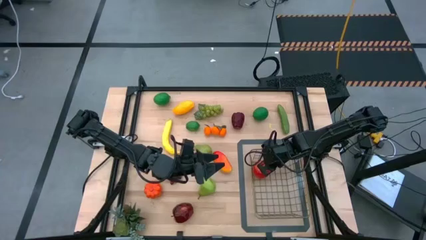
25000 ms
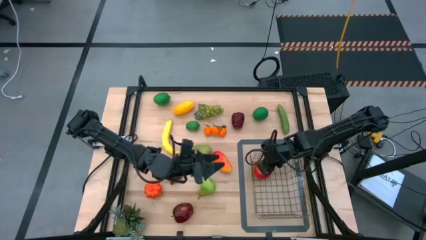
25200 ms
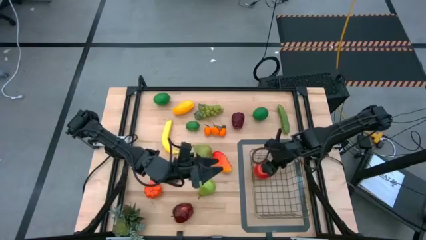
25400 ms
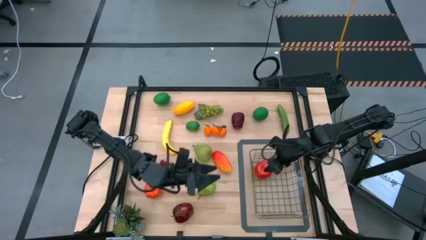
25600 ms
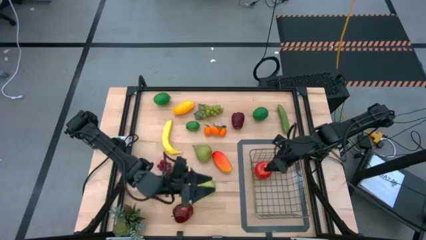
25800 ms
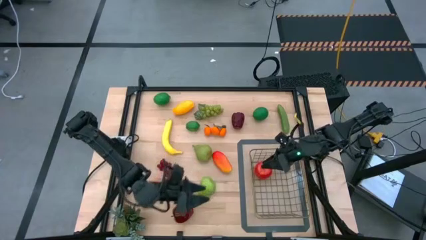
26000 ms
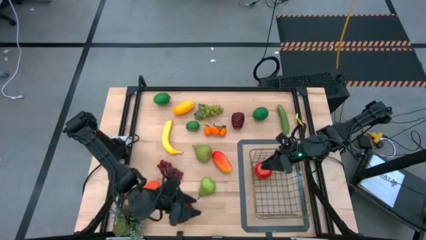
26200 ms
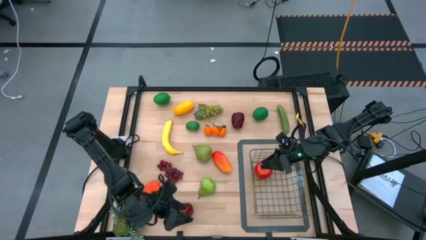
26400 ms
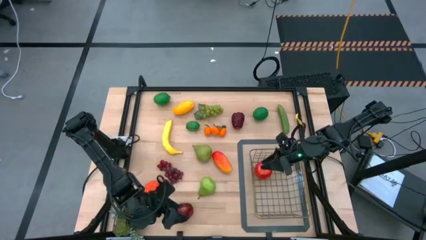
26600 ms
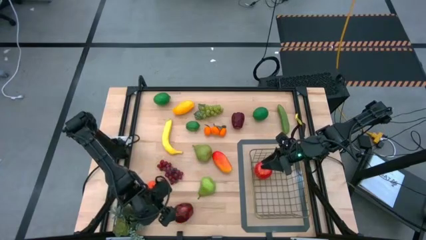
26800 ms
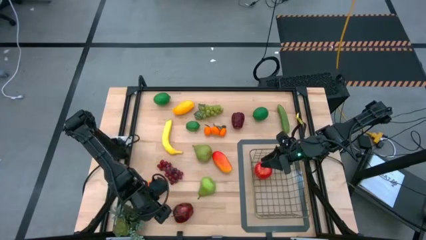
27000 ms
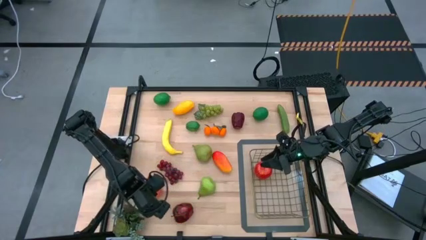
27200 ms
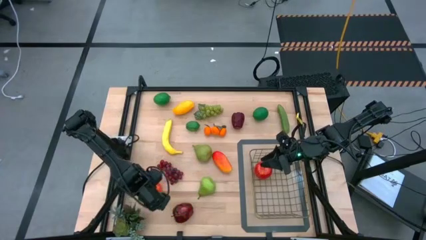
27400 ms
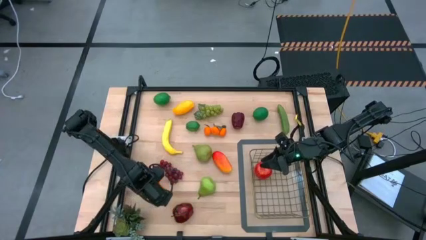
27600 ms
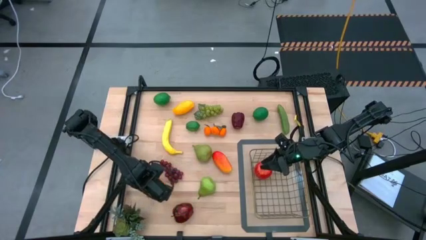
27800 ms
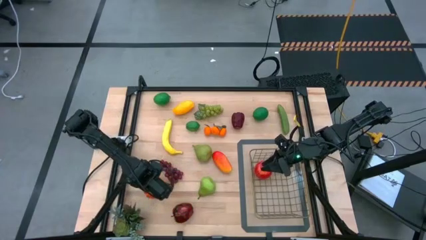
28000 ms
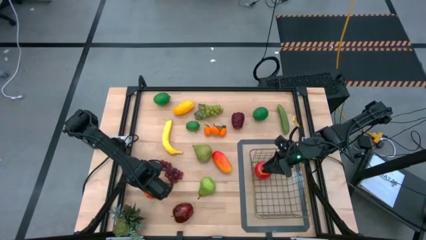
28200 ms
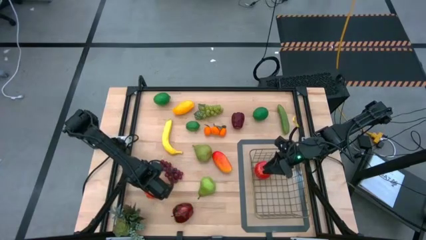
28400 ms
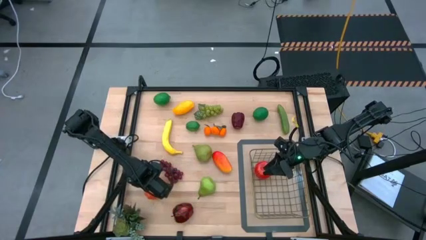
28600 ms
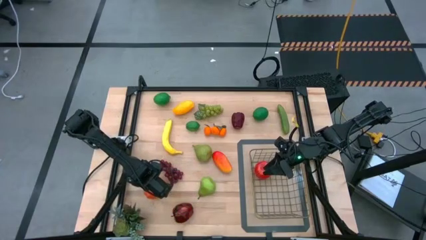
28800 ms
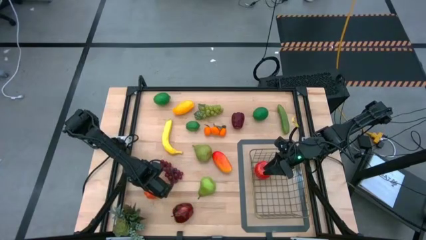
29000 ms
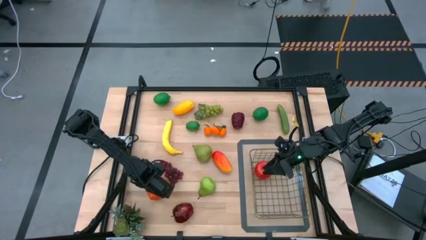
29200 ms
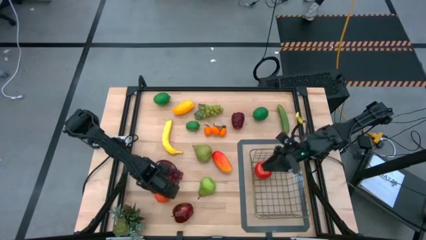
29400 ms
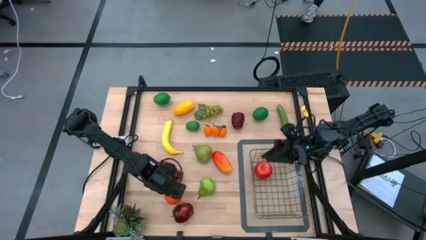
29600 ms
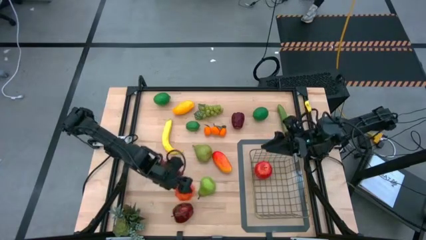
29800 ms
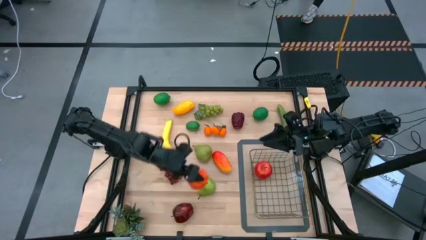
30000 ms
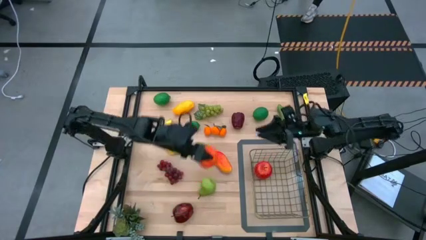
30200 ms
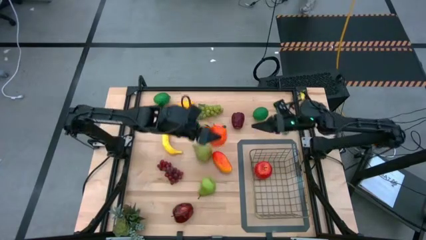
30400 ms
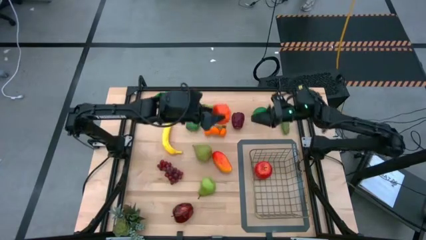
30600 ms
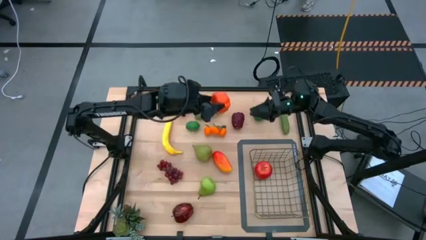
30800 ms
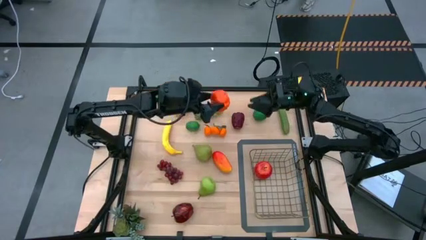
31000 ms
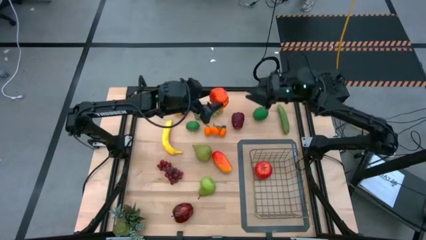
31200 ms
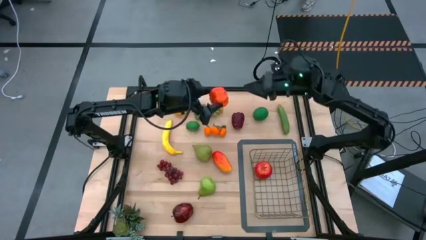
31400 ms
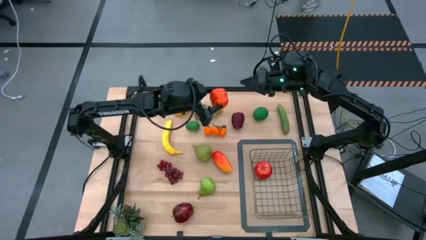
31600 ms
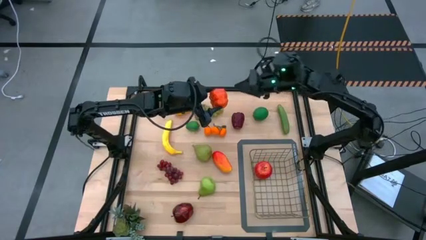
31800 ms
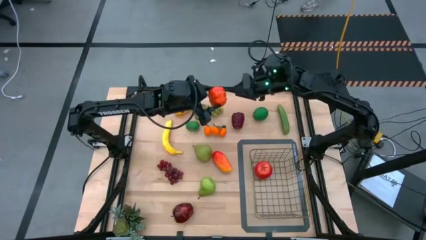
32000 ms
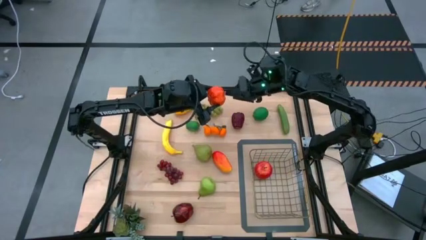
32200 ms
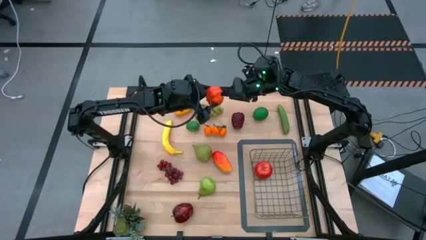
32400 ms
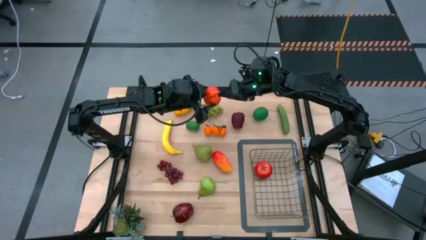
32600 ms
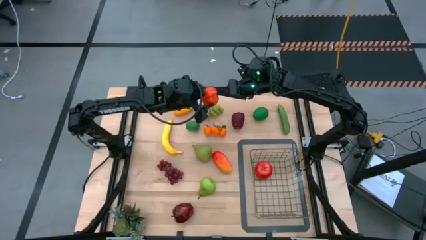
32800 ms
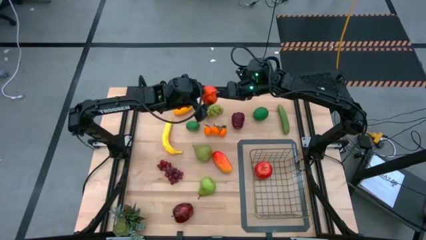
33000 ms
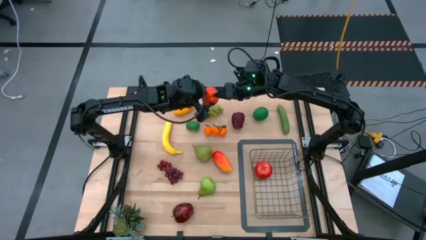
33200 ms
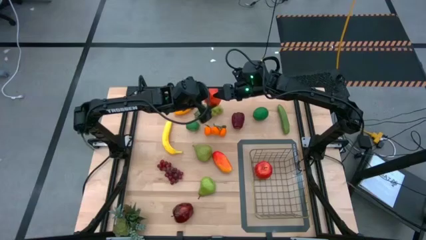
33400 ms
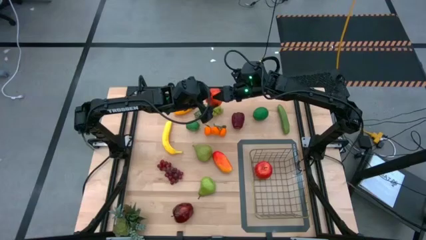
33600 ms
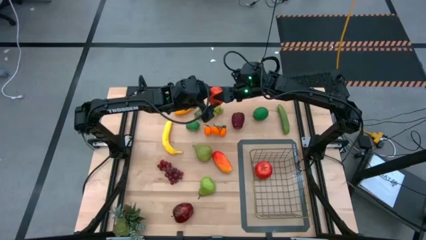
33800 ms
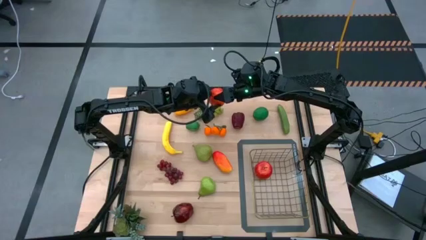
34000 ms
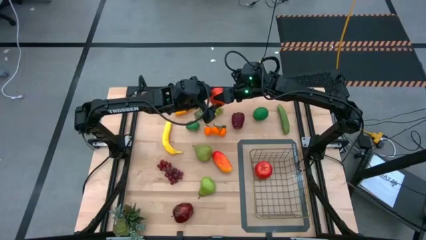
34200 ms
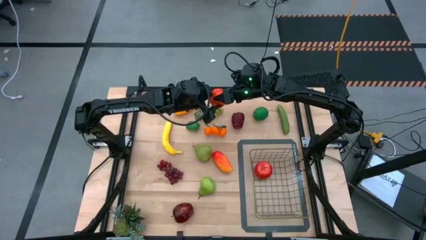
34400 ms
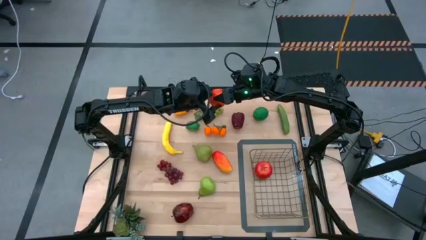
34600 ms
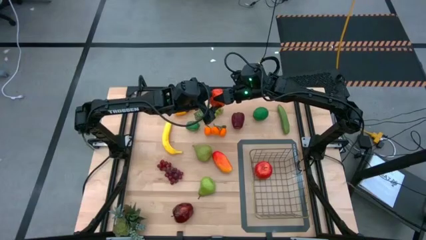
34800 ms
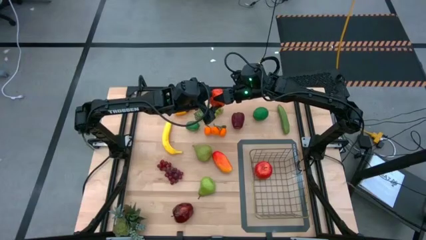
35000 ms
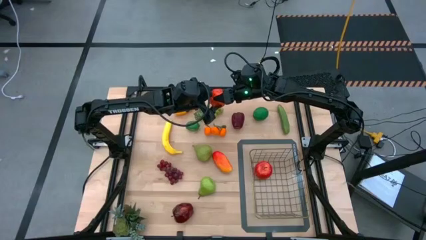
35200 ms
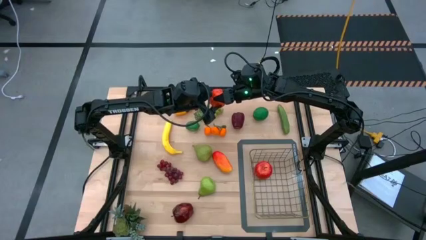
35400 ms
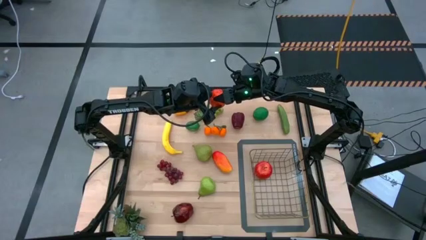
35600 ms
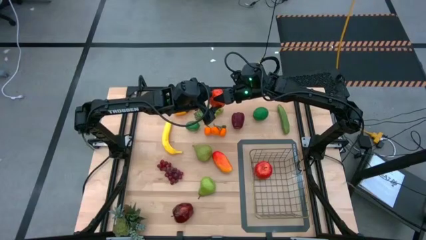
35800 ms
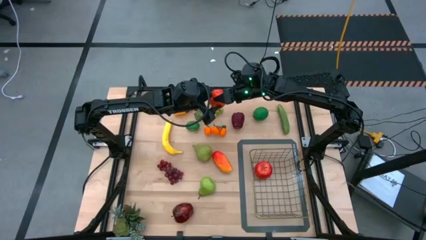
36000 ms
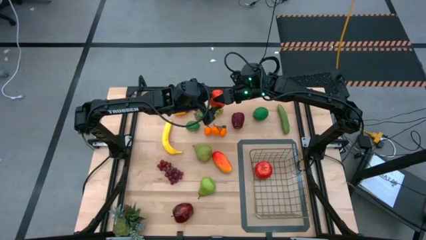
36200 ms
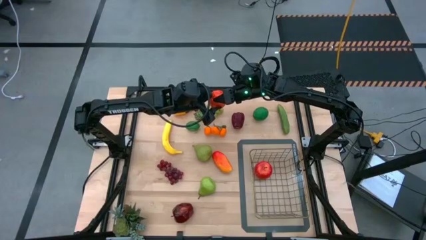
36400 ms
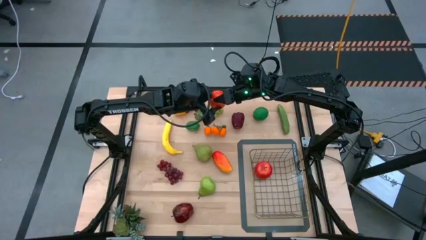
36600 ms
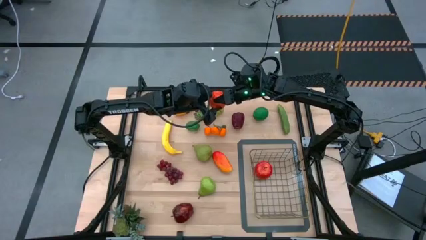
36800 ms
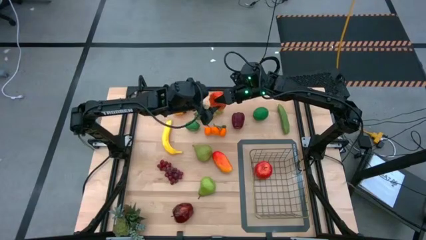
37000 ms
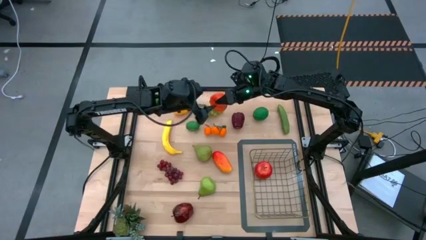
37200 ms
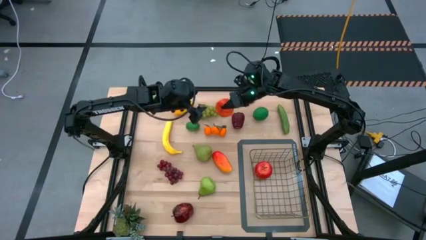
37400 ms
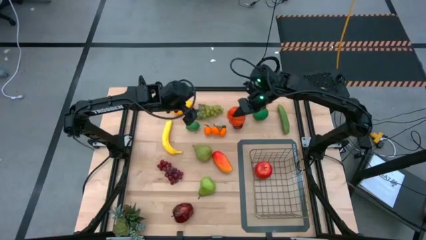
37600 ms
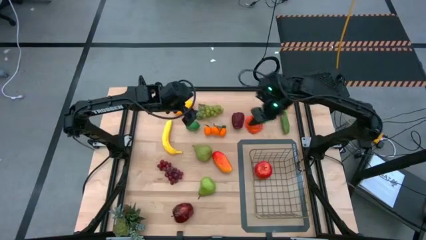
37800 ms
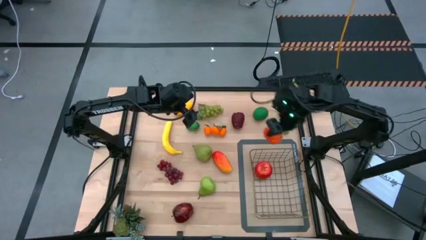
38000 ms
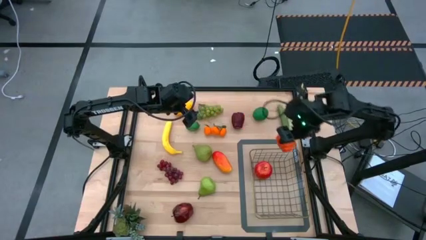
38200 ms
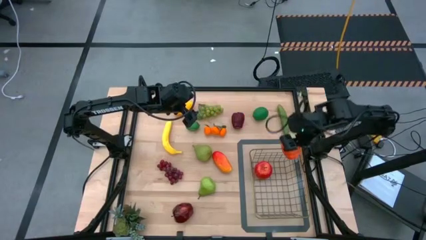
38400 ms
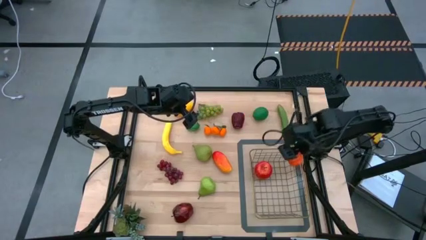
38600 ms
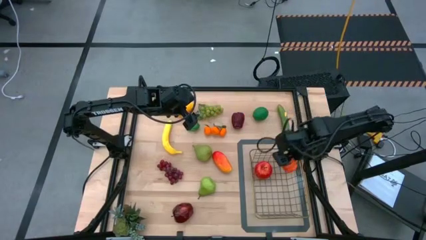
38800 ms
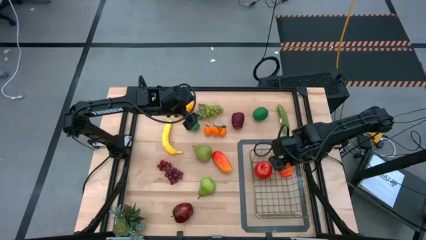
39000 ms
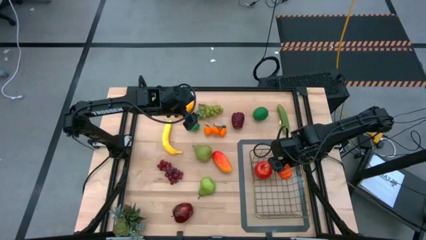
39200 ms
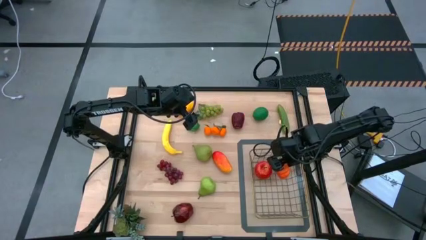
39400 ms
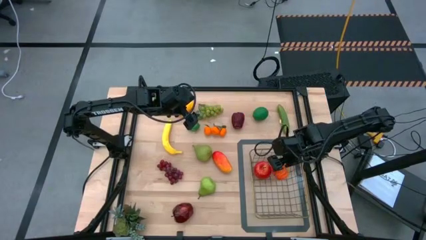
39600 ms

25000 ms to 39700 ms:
Task: Build produce basket
Put the orange pumpkin into the wire basket
